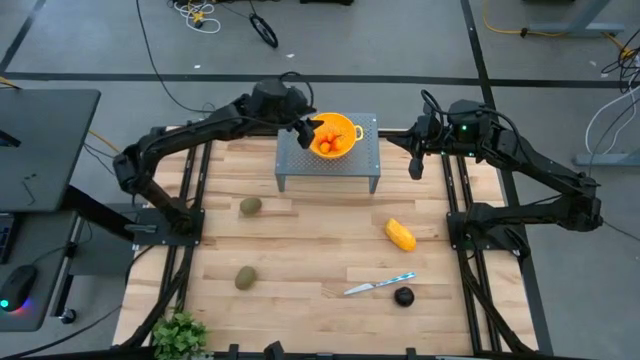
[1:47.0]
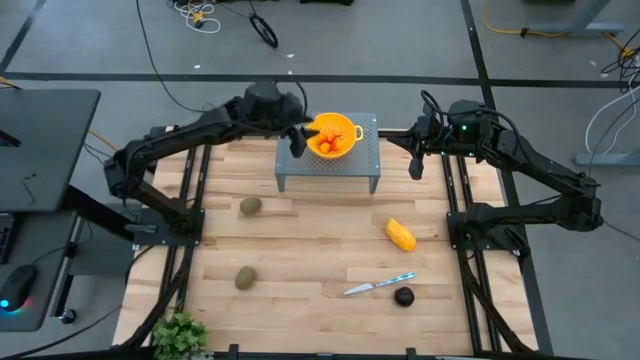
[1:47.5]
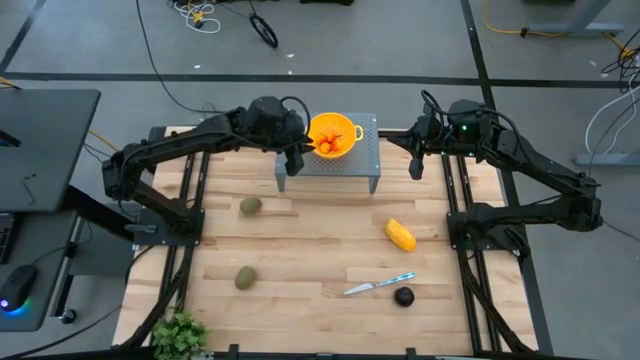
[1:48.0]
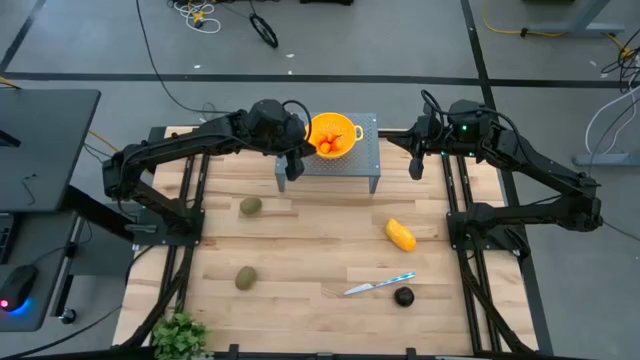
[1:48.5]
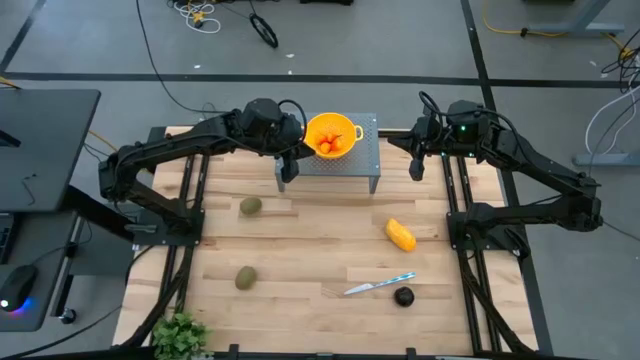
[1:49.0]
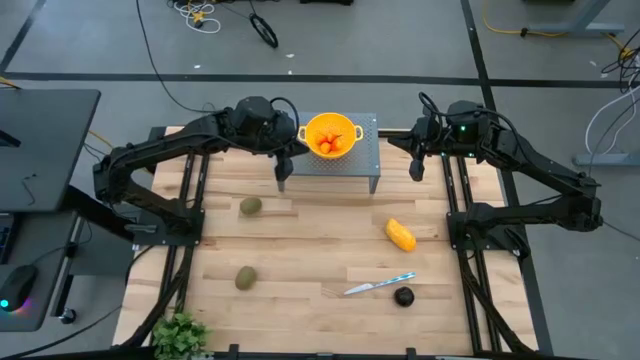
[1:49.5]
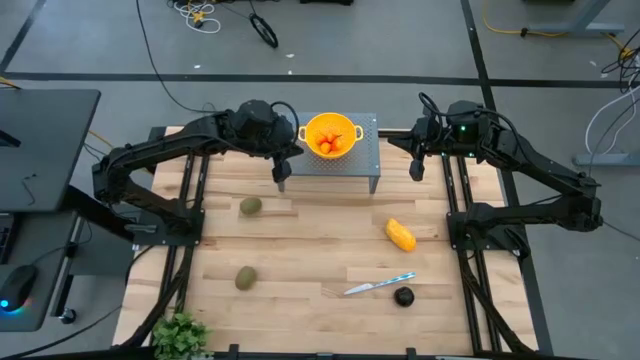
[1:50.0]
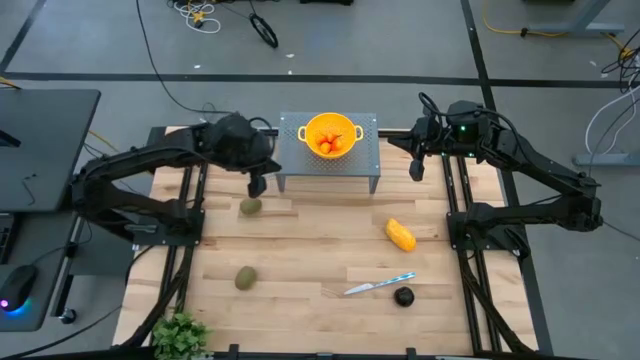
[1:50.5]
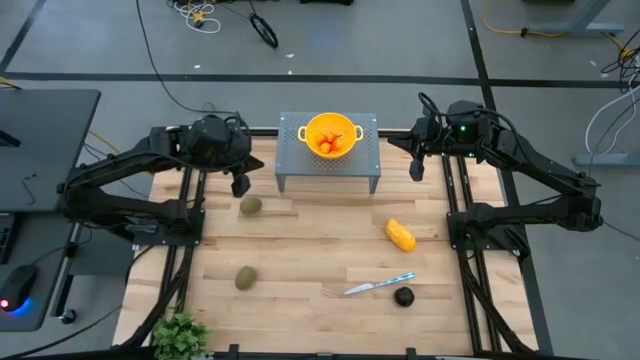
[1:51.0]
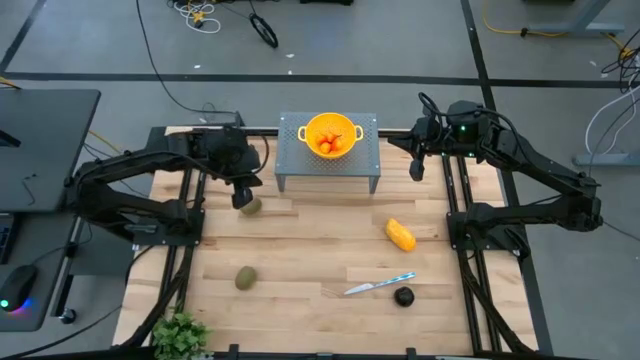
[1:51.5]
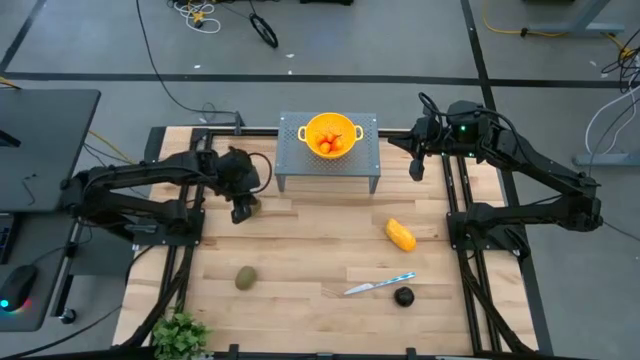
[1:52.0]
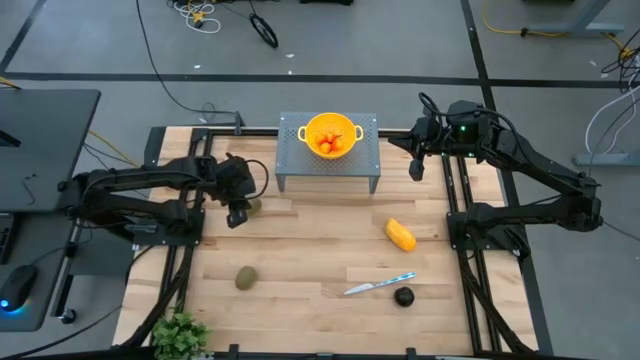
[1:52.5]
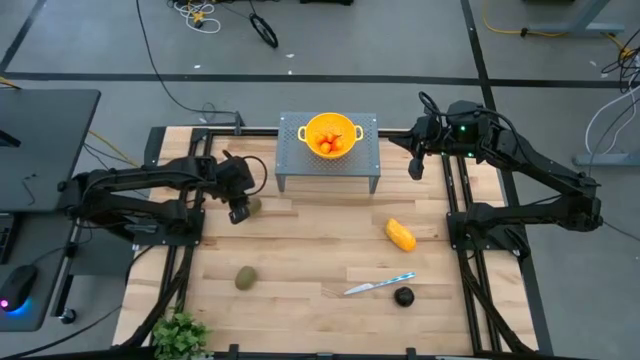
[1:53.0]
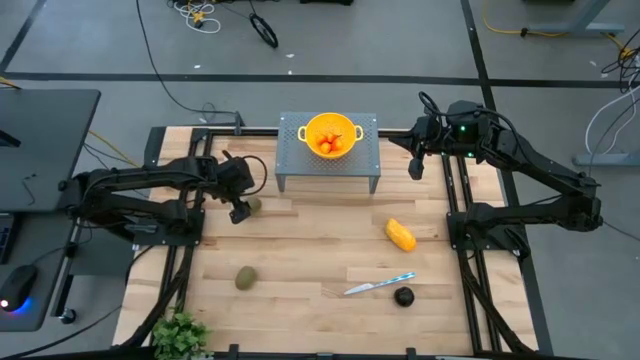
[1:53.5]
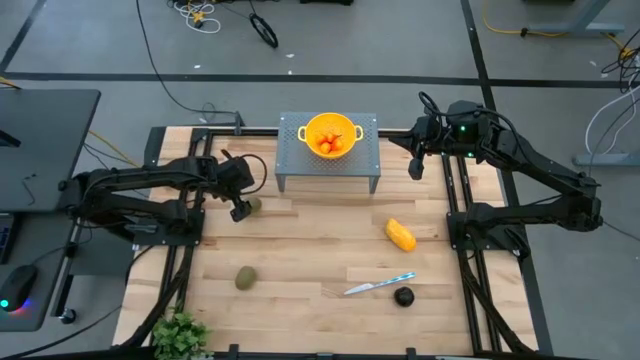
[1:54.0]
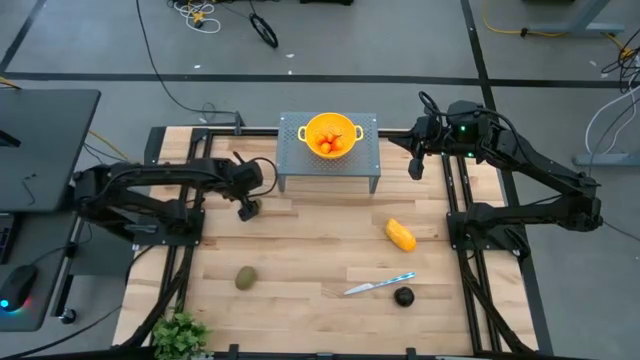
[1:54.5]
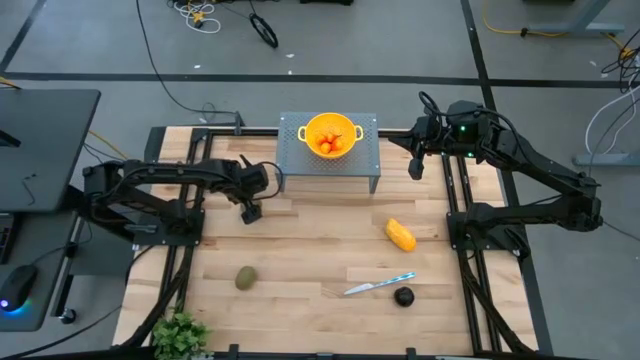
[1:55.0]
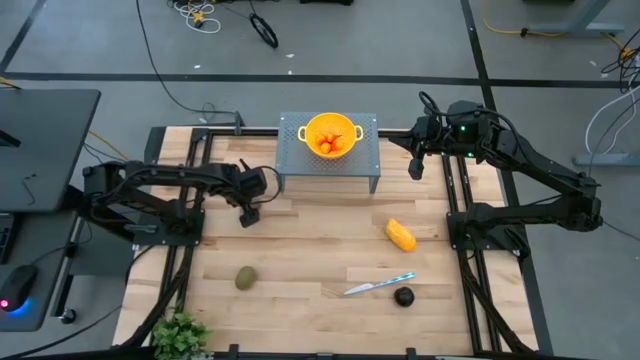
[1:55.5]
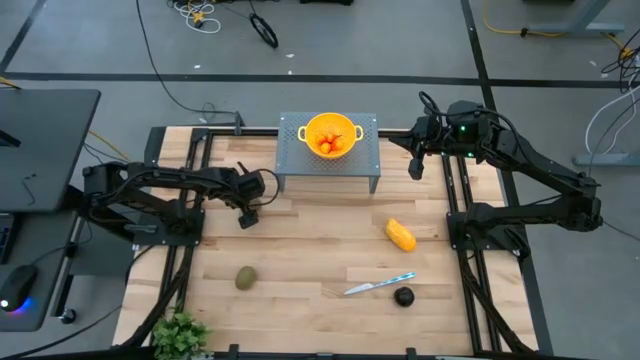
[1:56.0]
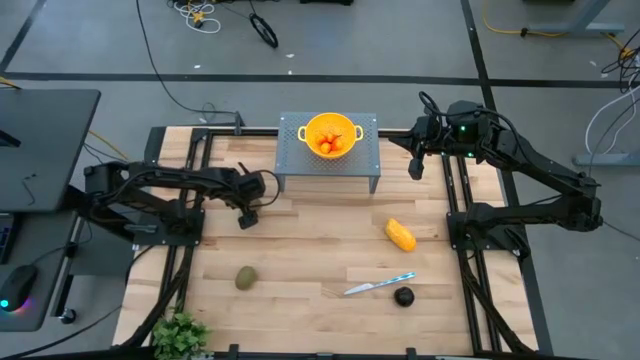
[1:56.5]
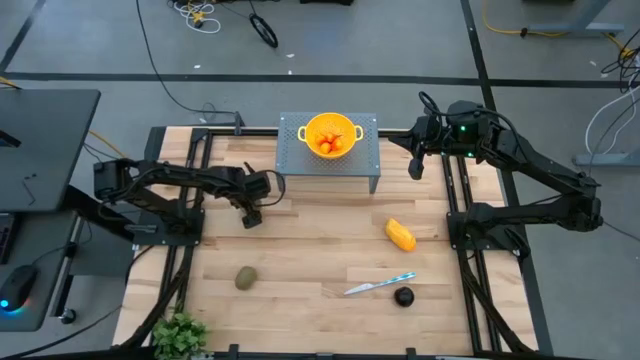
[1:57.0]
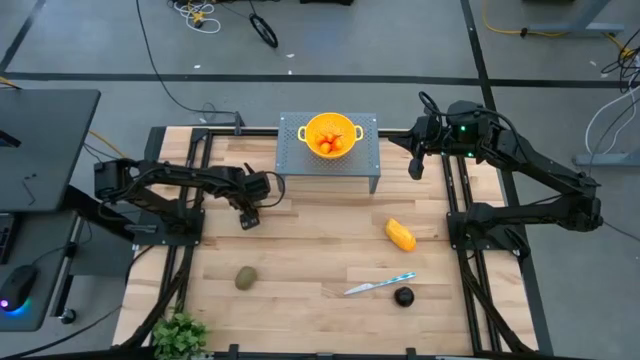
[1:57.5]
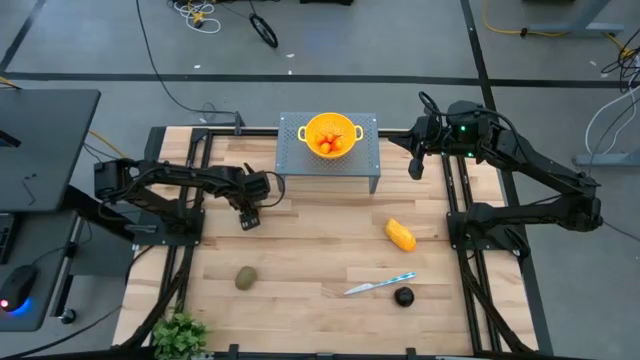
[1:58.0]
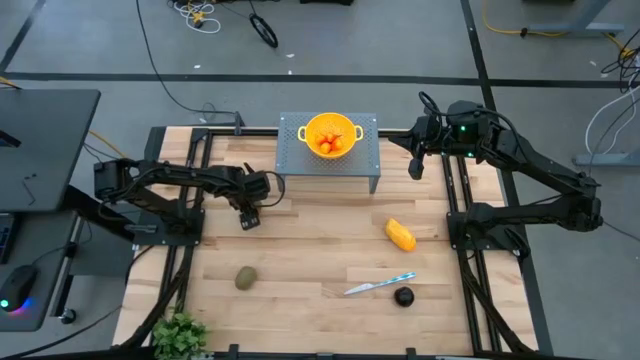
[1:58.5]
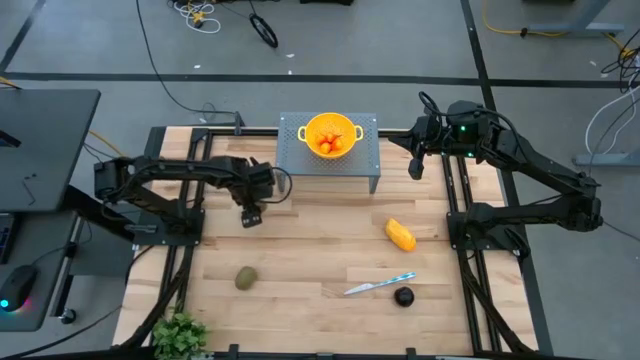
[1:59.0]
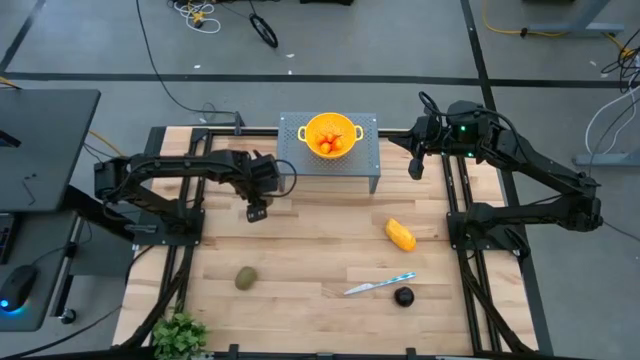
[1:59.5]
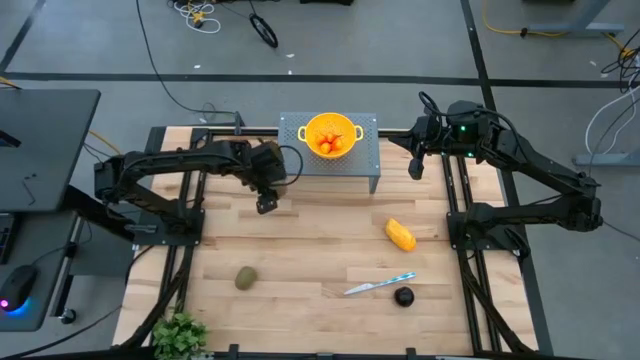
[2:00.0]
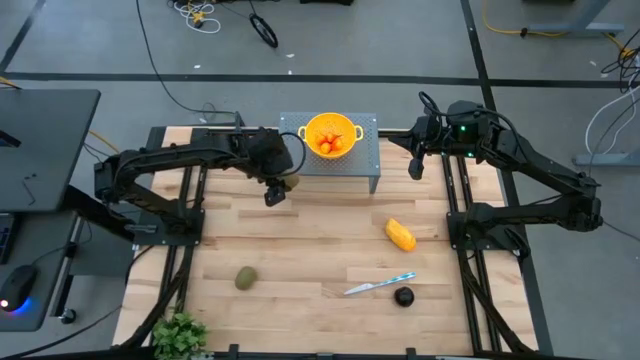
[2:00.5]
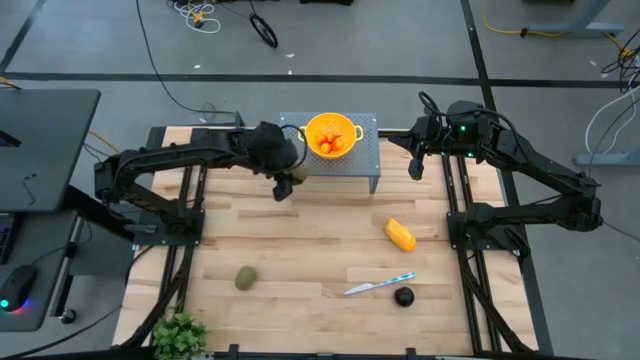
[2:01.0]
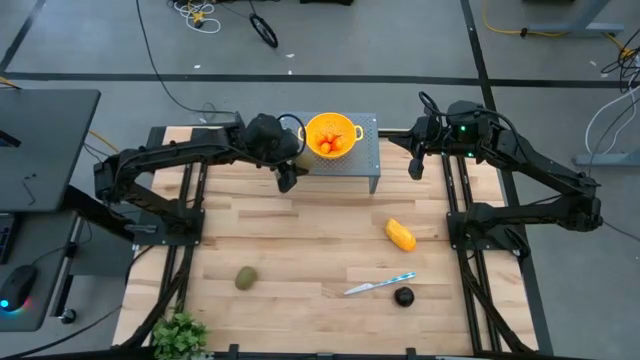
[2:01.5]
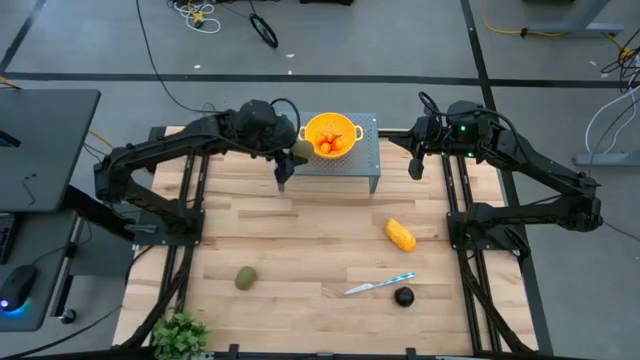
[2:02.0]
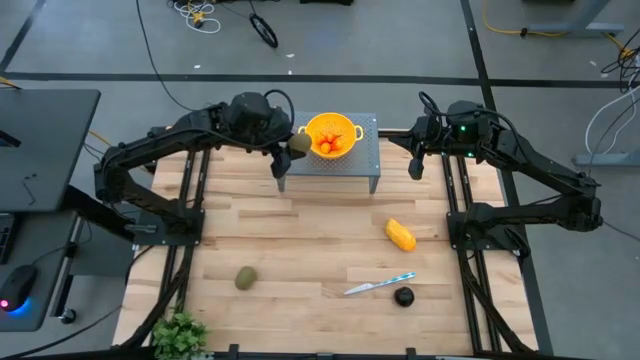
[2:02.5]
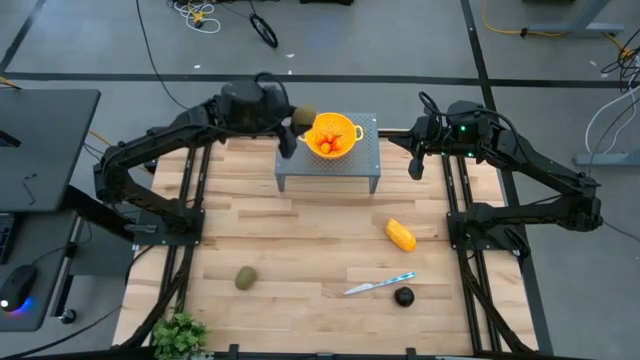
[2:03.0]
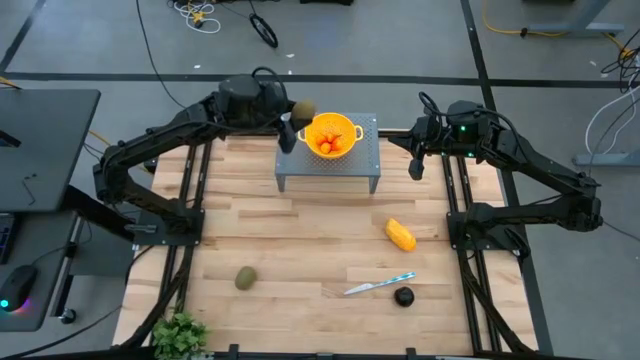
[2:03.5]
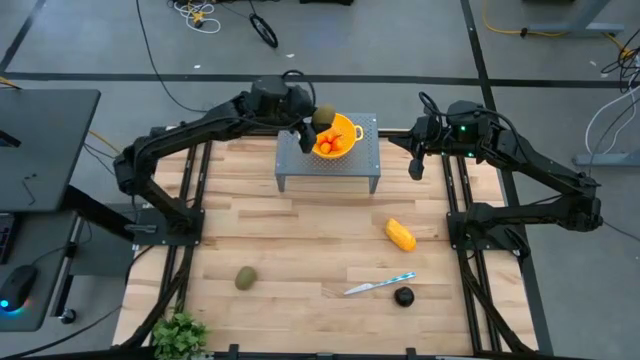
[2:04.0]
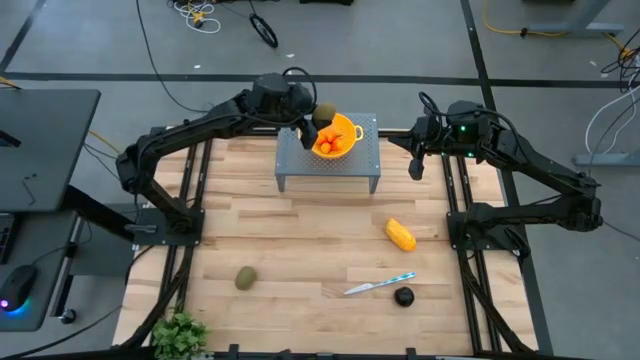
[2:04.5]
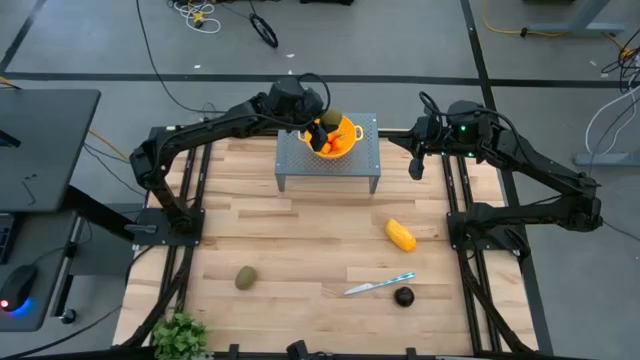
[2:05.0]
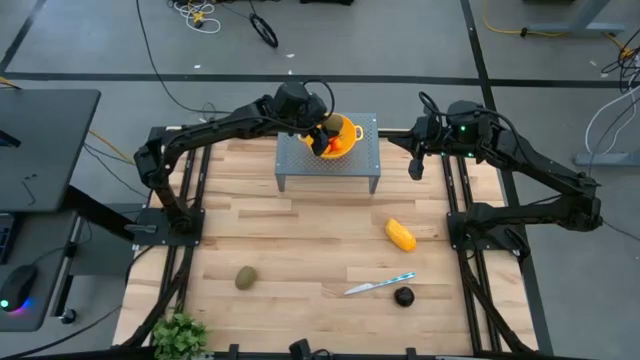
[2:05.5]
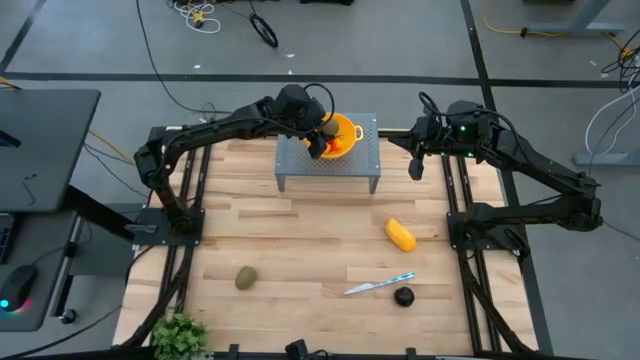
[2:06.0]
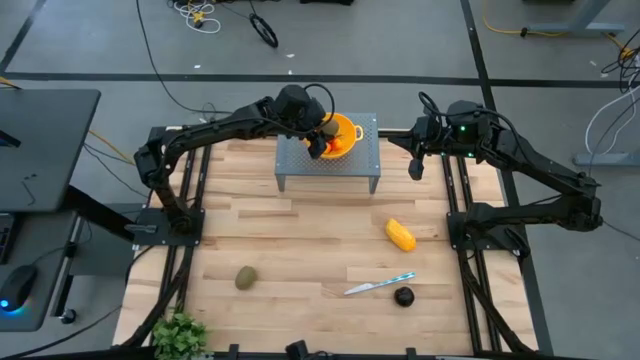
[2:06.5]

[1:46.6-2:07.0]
Task: Pick & Place Fruit
Put the brown kiwi into the yellow strainer bowl on the shelf
